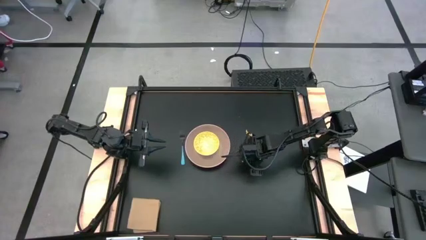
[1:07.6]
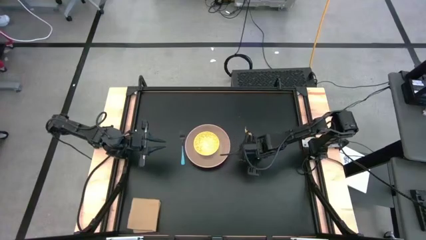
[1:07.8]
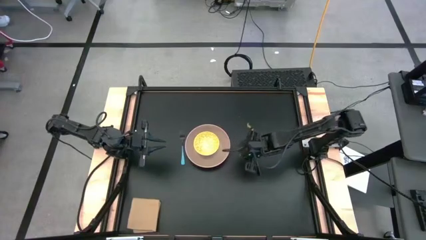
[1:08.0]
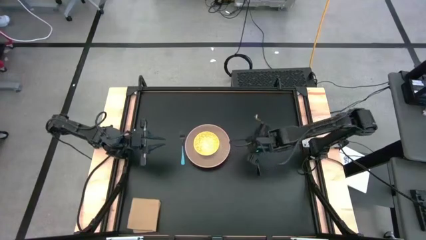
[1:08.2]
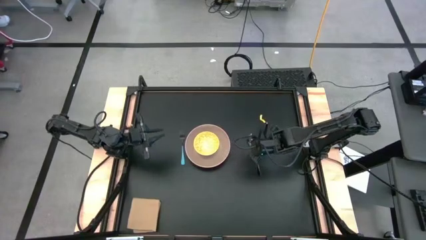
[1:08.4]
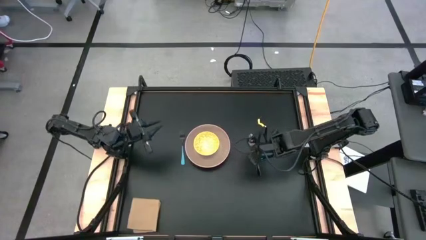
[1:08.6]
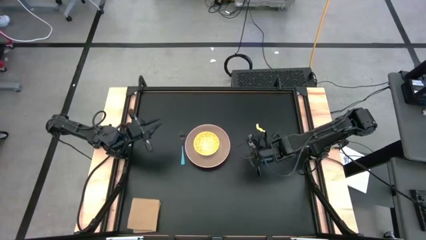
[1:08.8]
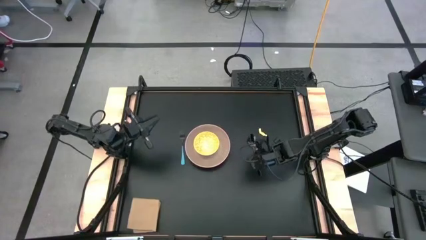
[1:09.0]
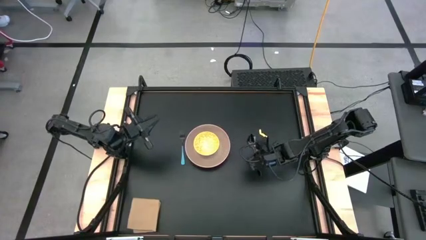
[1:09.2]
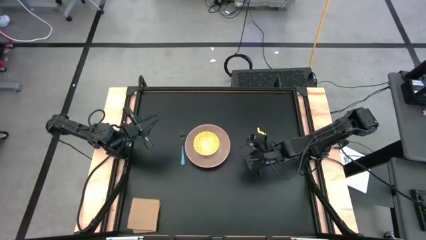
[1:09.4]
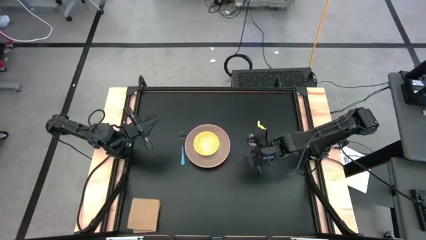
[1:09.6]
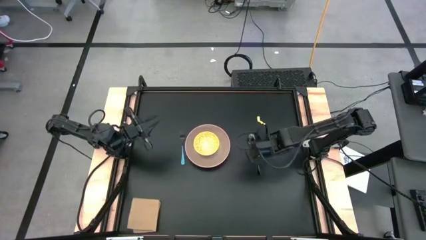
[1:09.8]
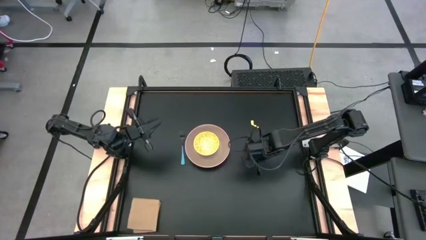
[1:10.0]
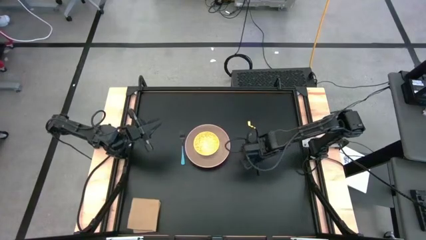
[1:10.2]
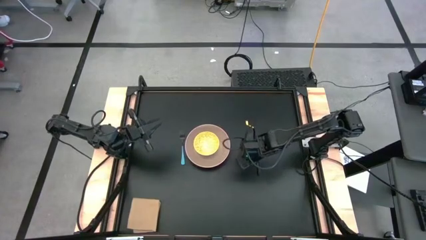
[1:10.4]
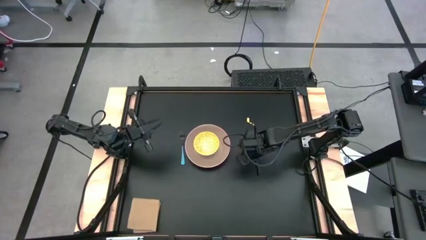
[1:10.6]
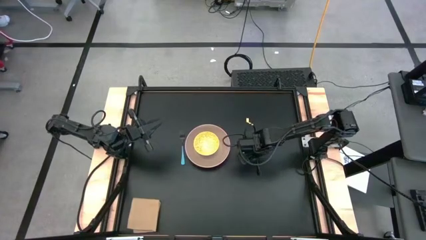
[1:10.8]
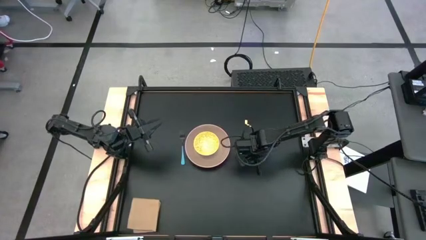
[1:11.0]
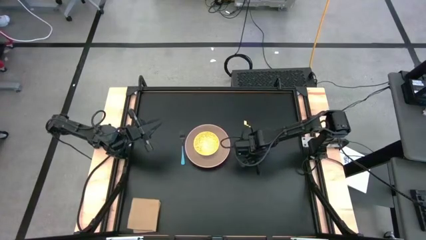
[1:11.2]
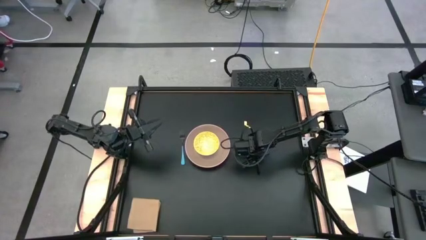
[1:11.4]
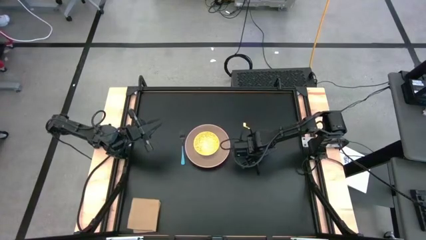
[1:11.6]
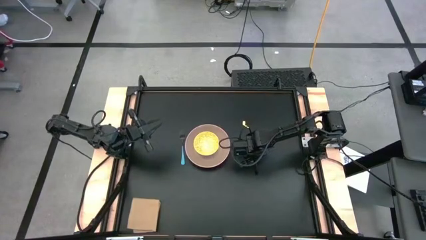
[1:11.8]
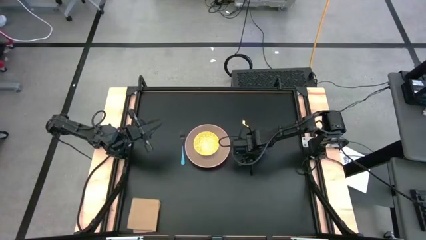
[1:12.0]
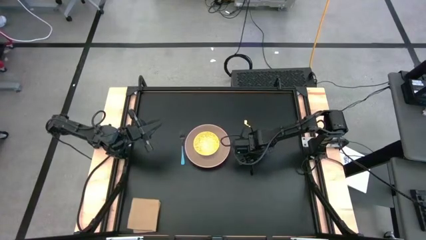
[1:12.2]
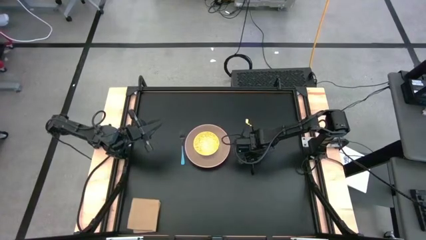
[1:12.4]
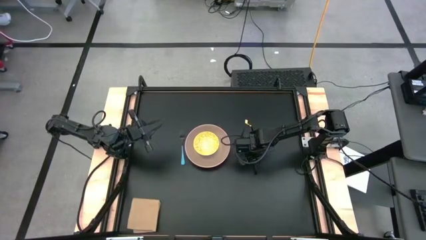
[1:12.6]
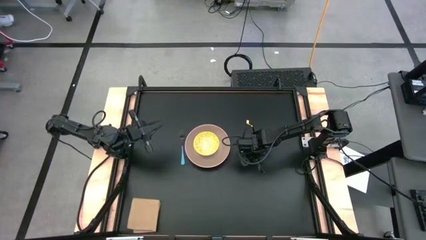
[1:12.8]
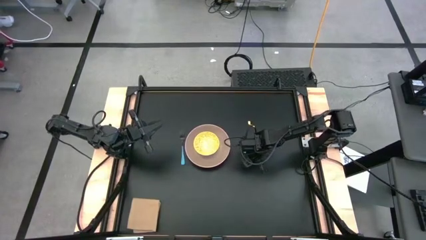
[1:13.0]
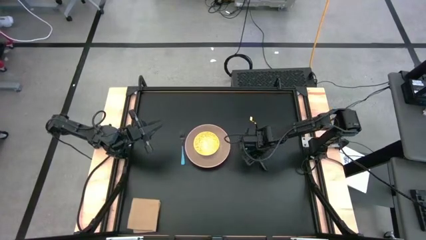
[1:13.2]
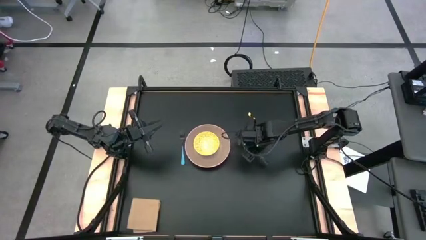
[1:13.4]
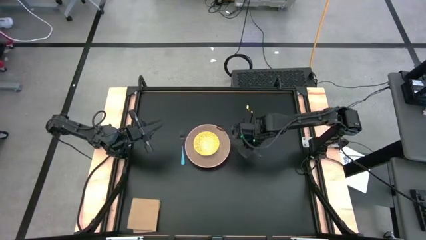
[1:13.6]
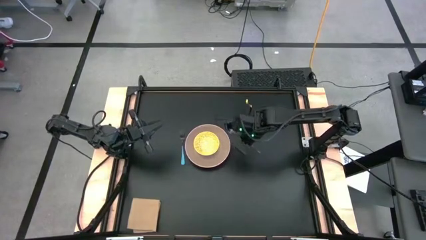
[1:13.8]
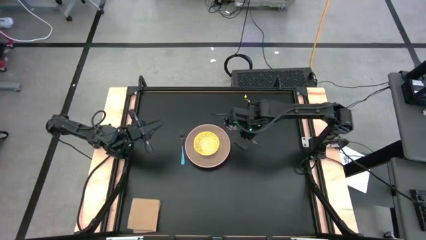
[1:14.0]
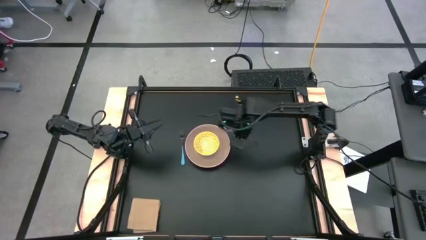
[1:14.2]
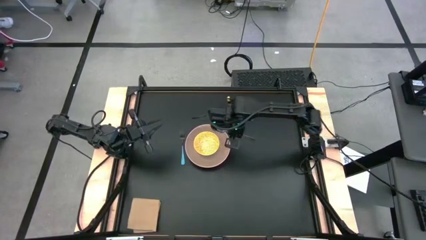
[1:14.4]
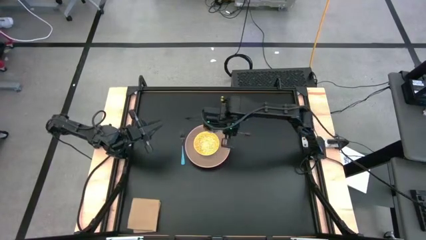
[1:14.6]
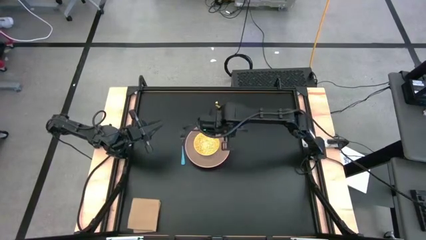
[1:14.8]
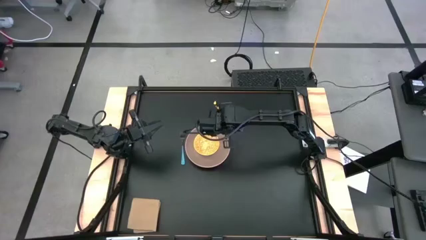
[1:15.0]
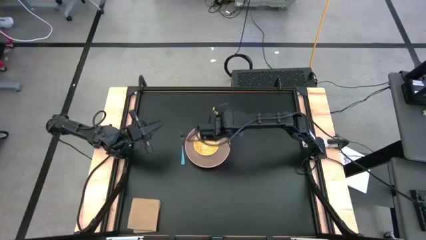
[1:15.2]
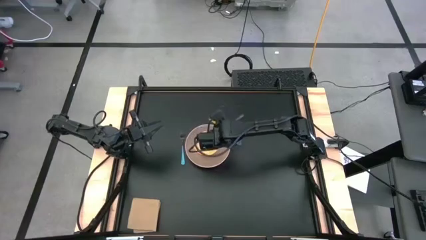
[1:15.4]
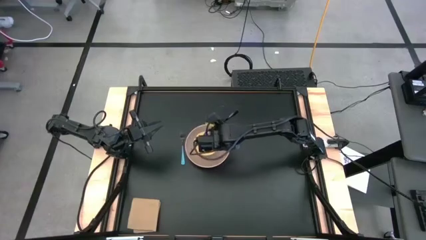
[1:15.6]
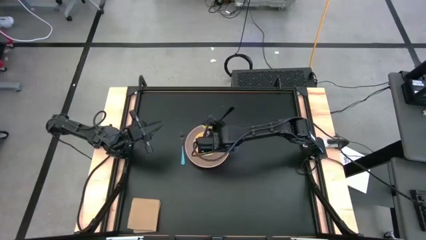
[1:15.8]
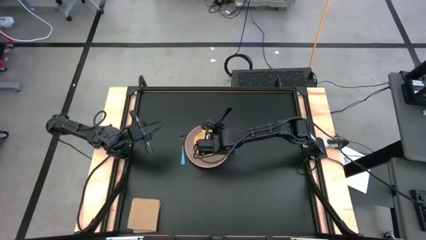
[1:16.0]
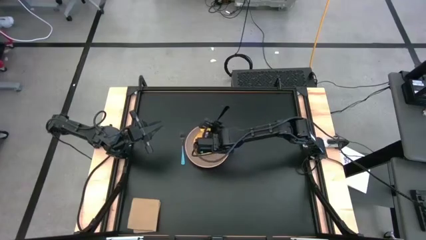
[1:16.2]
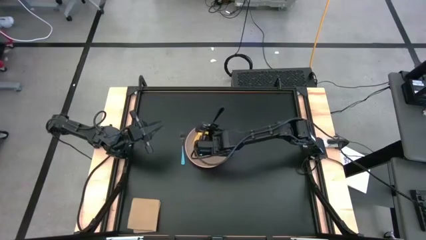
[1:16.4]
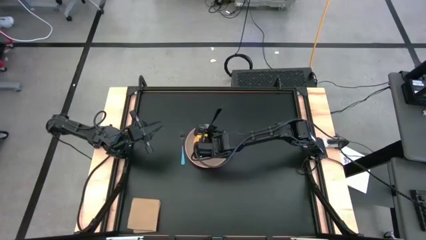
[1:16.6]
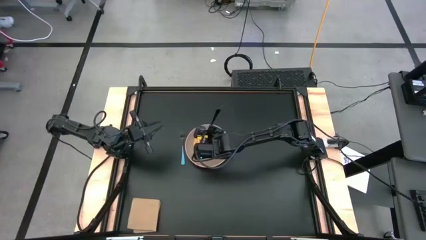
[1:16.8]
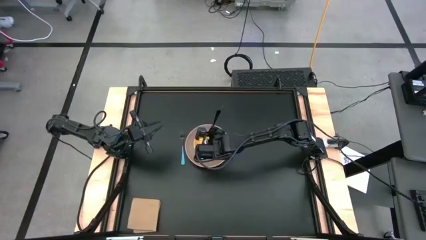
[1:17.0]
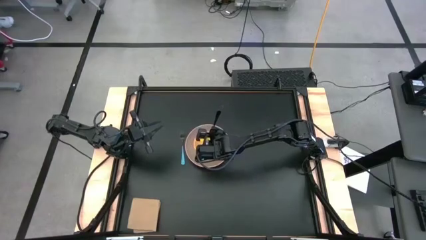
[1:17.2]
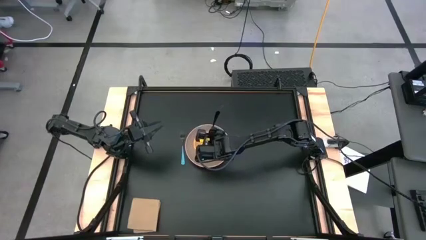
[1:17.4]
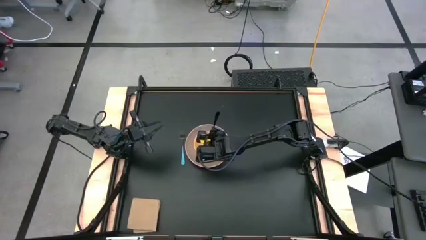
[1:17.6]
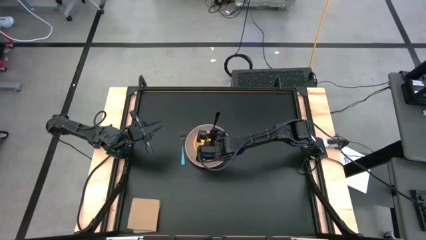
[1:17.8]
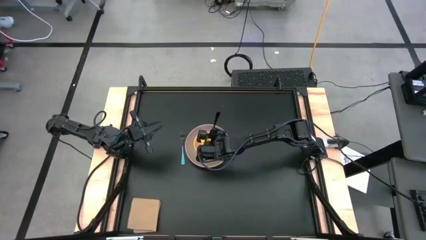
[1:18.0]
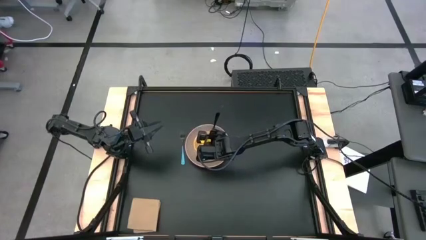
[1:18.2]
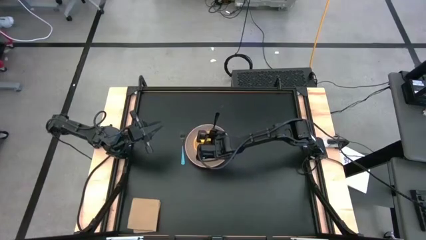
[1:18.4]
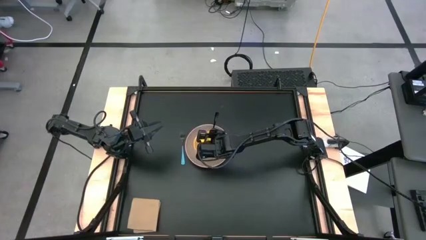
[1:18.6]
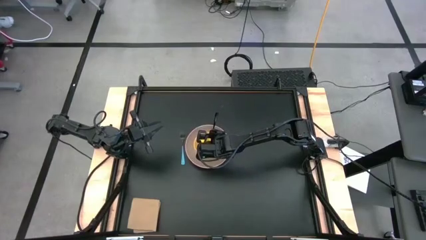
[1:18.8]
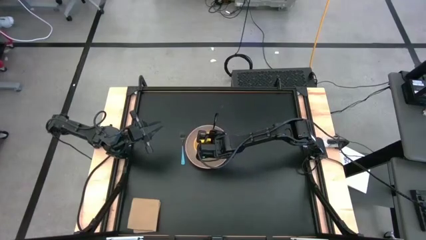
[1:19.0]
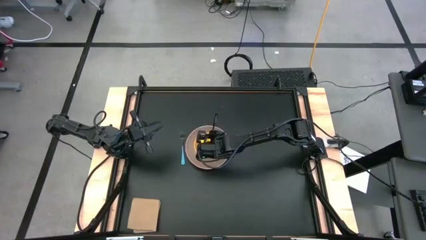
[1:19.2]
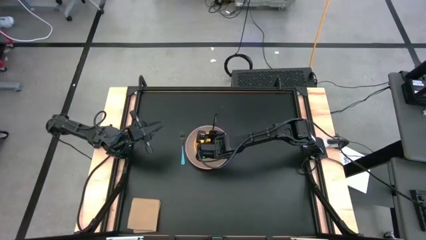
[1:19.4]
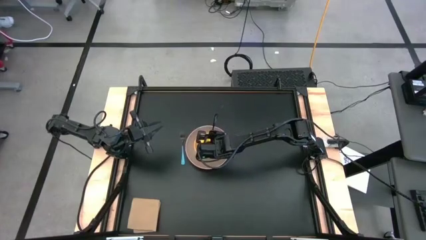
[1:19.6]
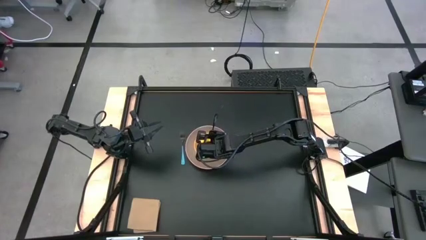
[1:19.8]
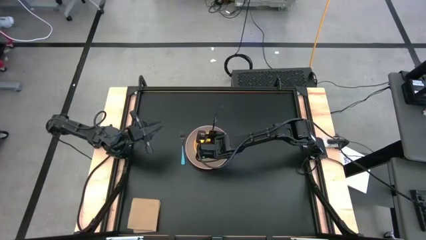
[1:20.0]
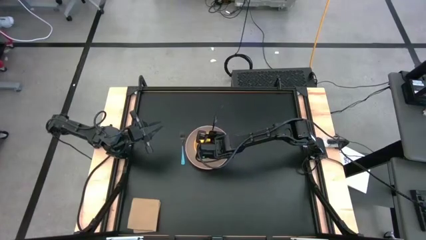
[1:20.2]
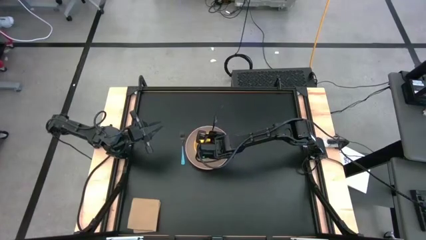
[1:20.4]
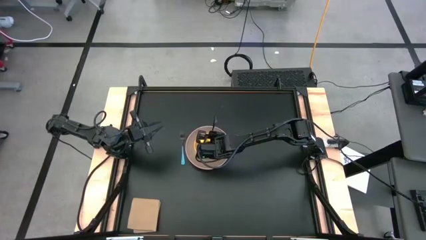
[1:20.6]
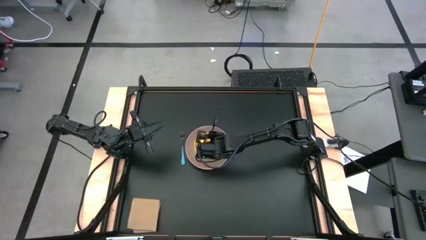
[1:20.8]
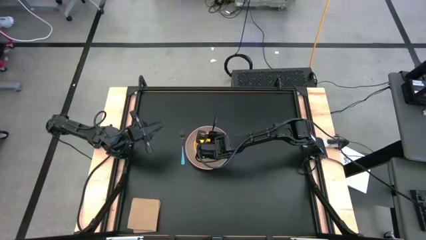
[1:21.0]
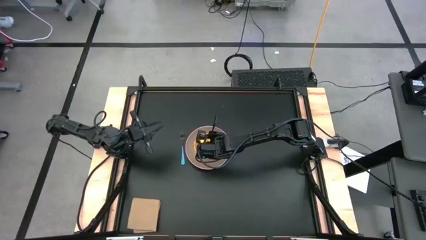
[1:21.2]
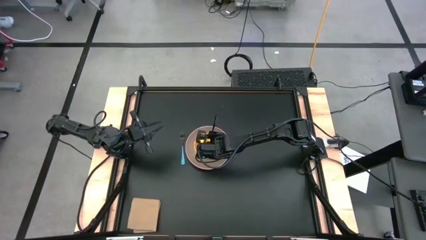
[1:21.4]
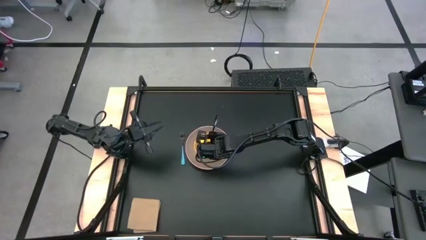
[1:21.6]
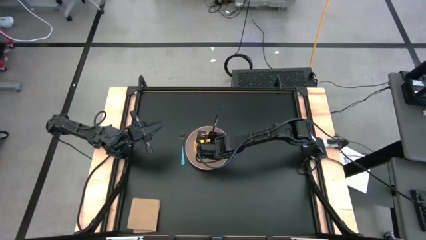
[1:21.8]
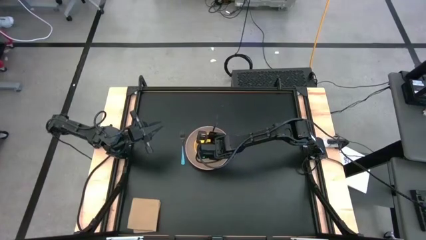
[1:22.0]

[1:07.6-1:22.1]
Task: Set table place
Put the spoon into the yellow bowl

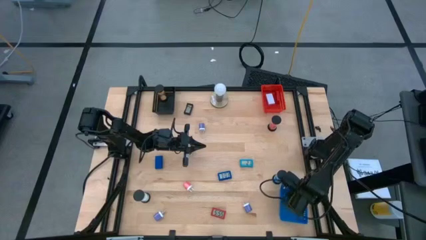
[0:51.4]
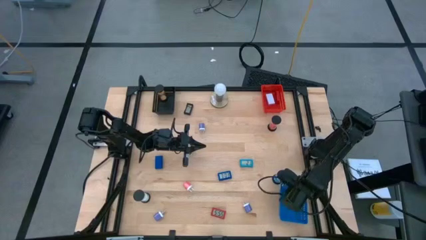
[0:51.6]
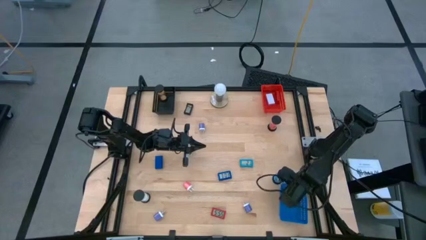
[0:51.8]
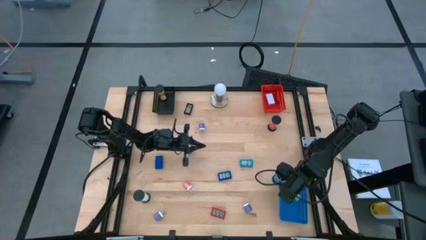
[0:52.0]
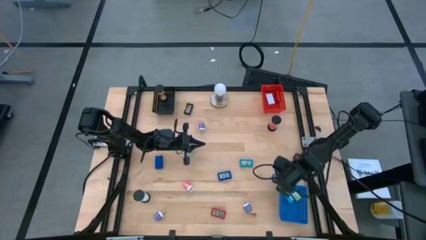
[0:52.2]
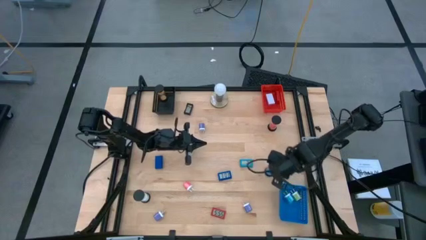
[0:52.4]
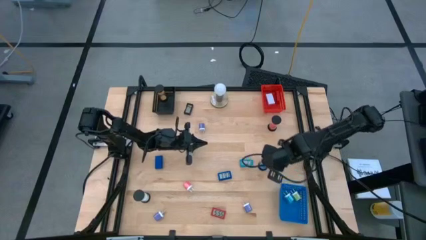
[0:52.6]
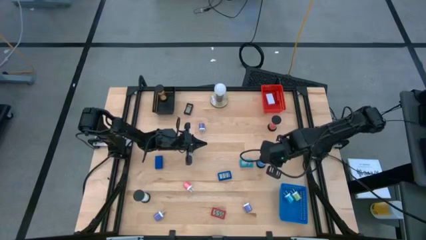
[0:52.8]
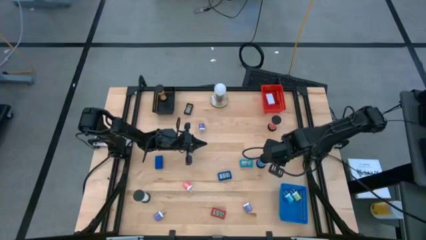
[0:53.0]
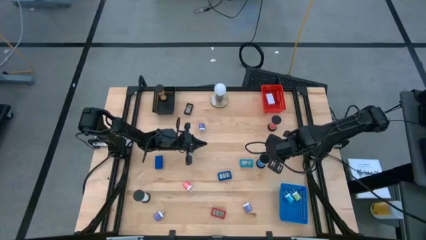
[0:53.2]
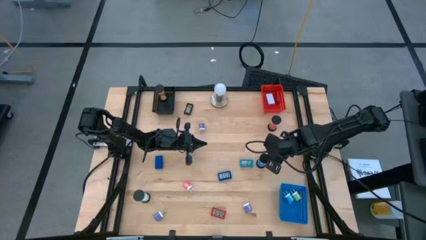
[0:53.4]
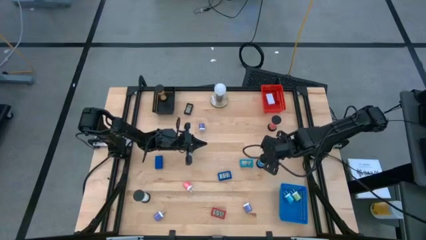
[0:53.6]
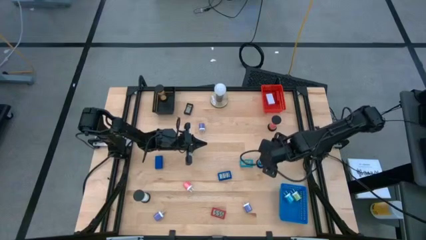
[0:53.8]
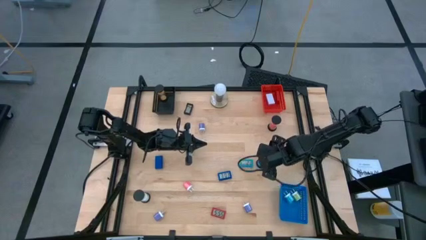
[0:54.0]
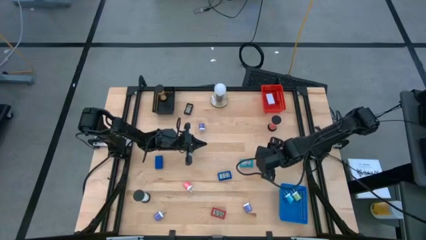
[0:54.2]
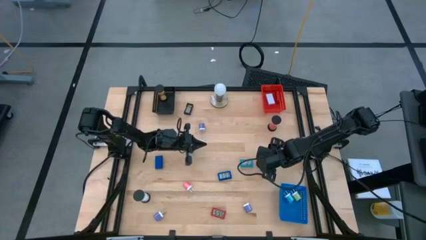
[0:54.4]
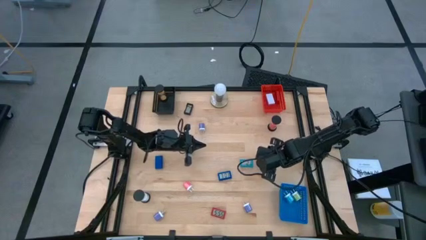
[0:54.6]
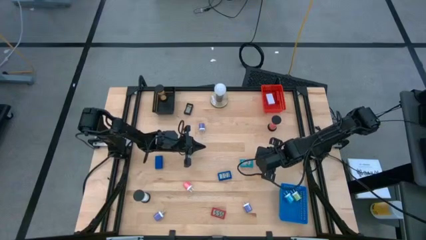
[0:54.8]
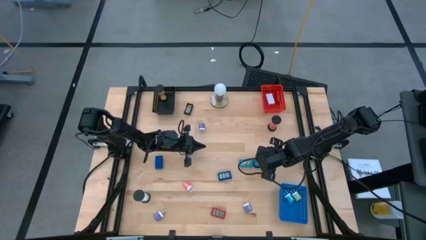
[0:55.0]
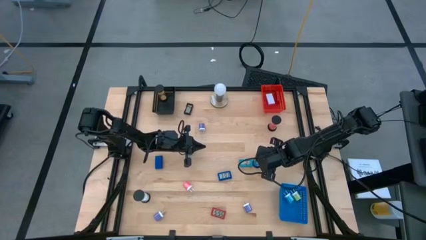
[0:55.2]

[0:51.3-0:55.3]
Task: Pick & Place Office items
Put the blue hourglass into the black bin
